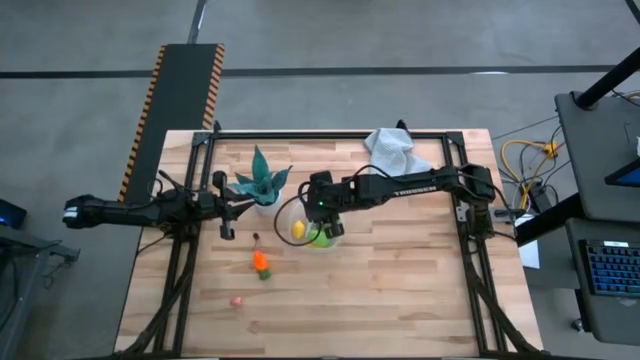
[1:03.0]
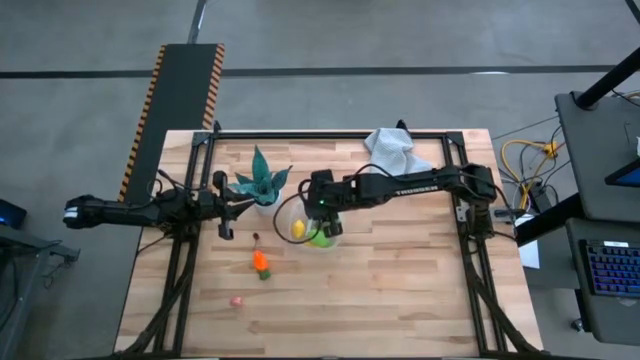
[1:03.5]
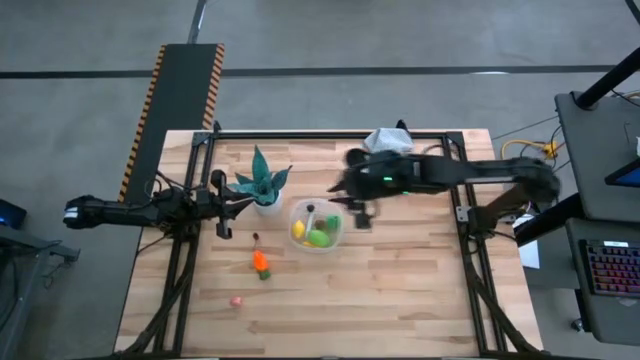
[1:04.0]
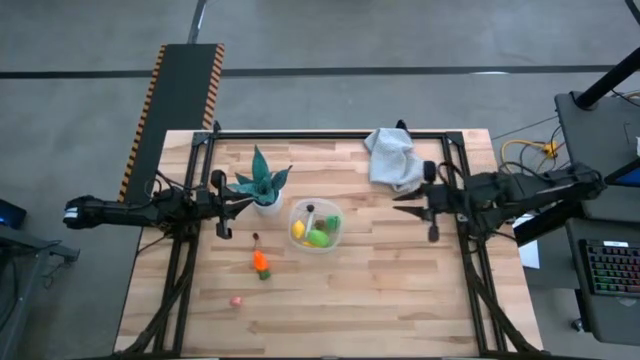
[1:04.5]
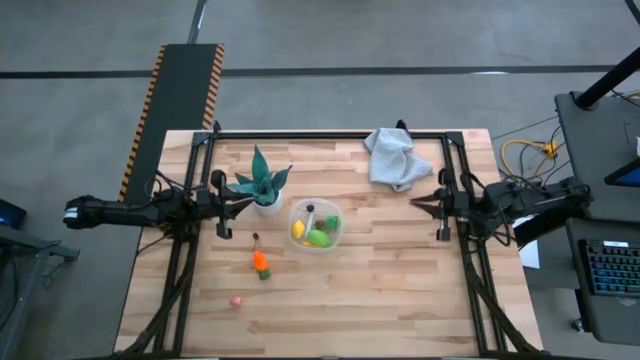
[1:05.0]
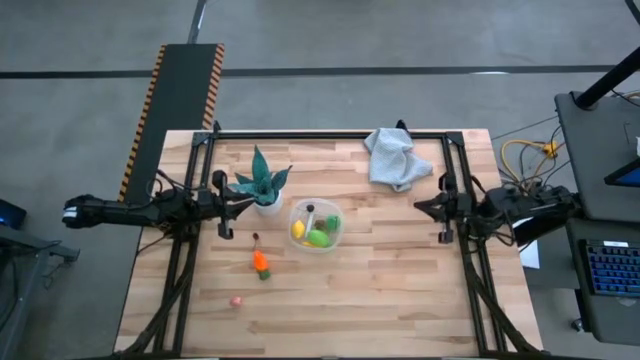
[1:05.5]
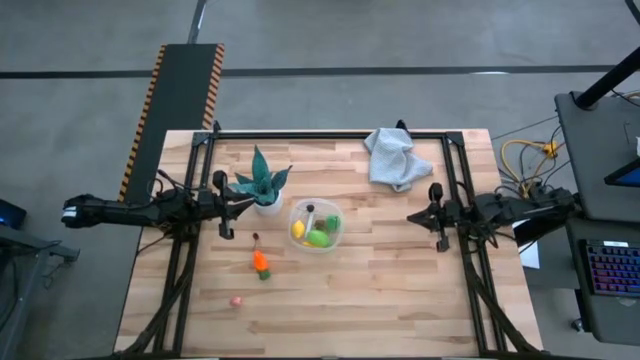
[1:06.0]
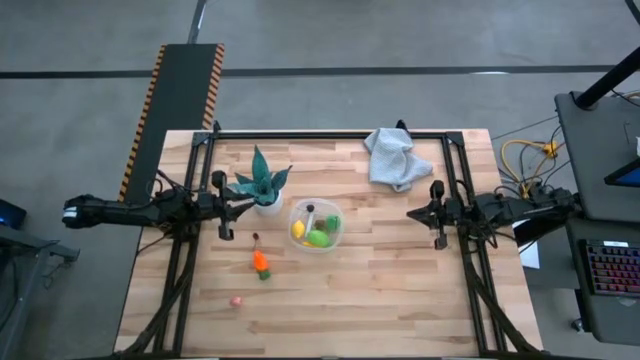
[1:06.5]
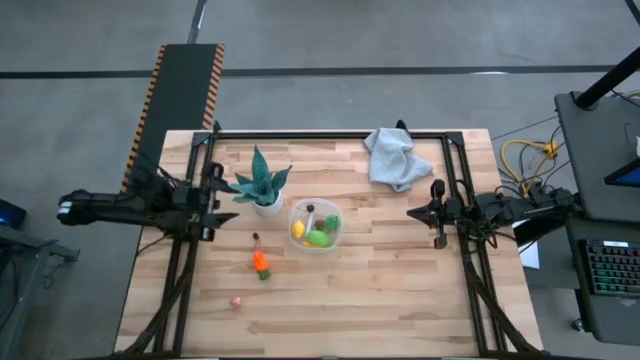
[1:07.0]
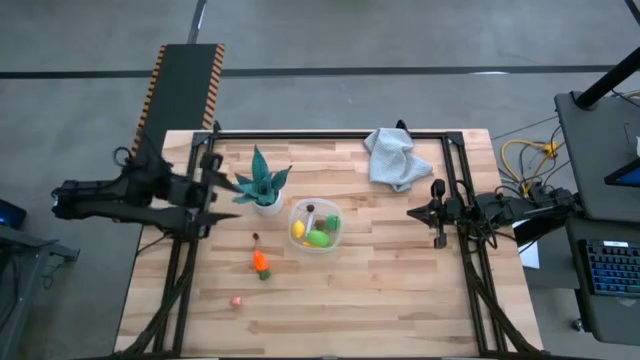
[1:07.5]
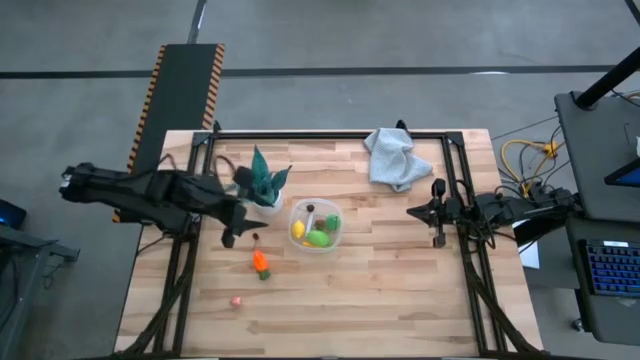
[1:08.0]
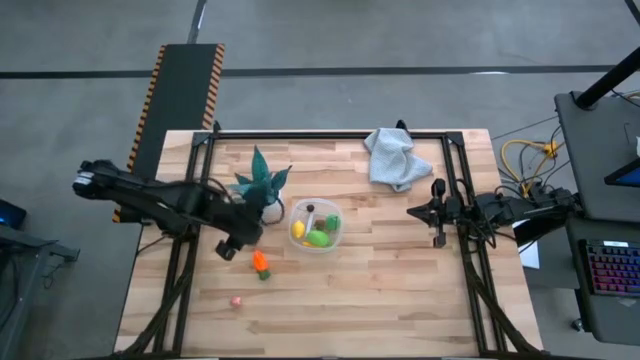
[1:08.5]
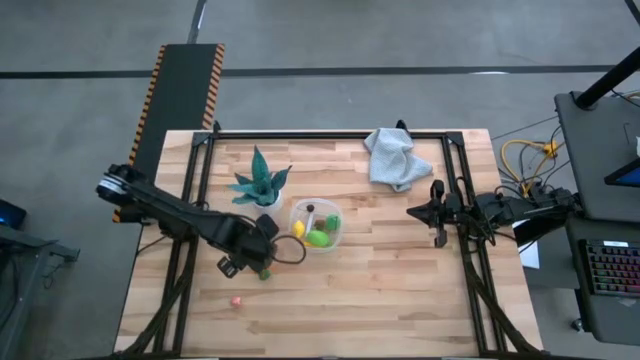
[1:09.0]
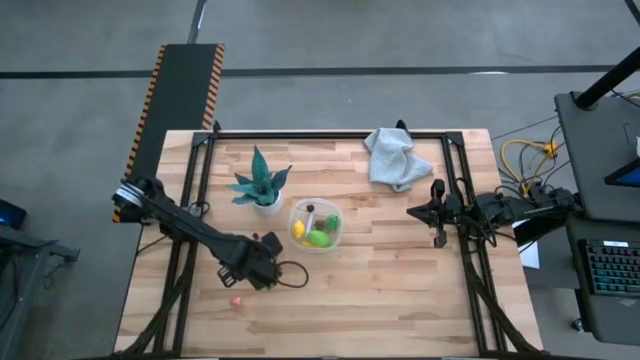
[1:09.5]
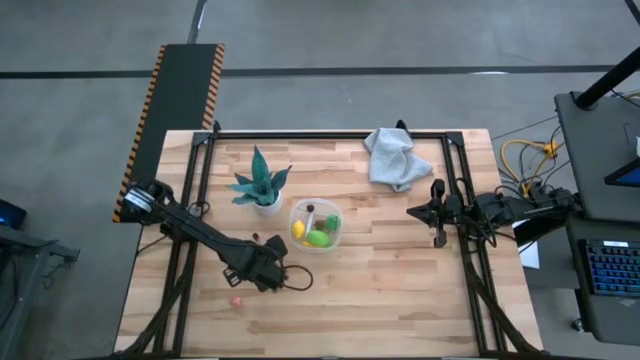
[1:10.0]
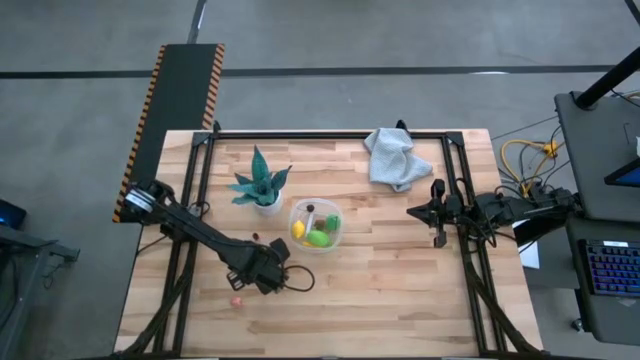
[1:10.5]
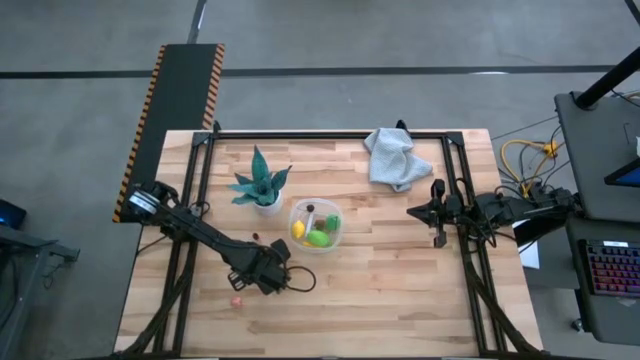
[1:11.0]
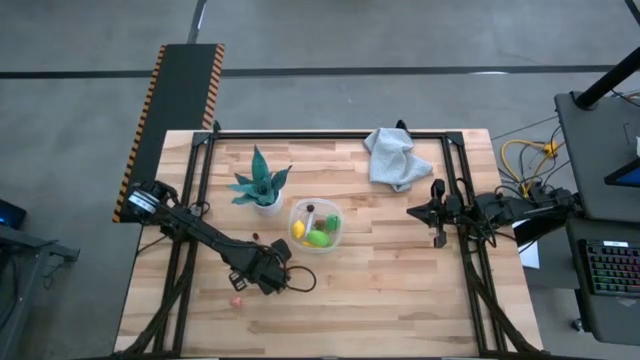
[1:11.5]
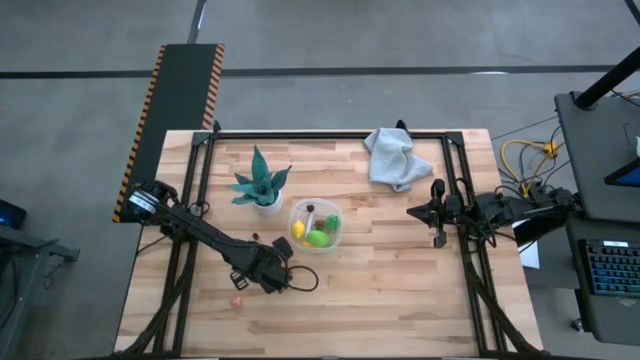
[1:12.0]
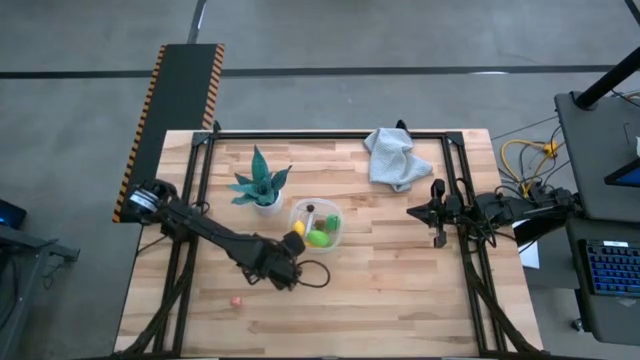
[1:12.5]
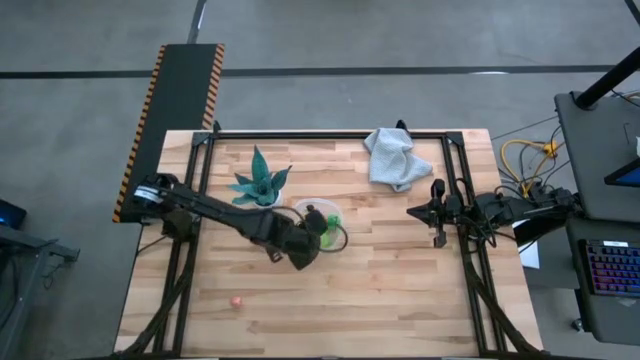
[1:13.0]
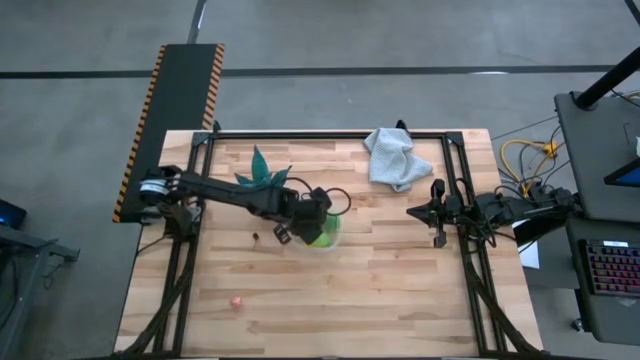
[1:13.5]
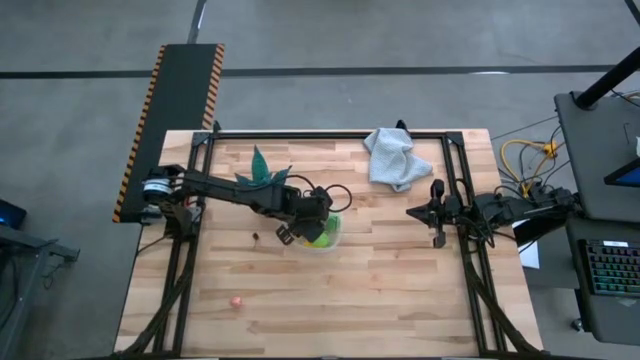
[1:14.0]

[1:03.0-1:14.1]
Task: Pick and placing Produce into tupperware
Put the orange carrot into the container

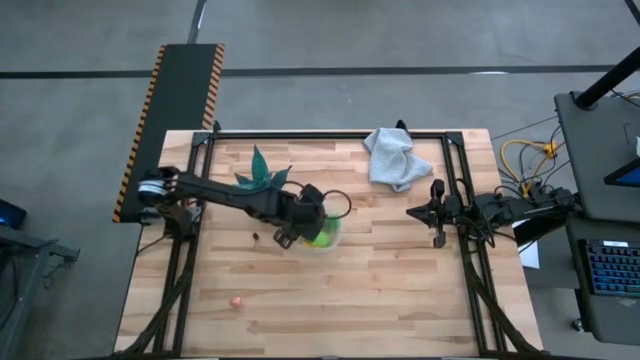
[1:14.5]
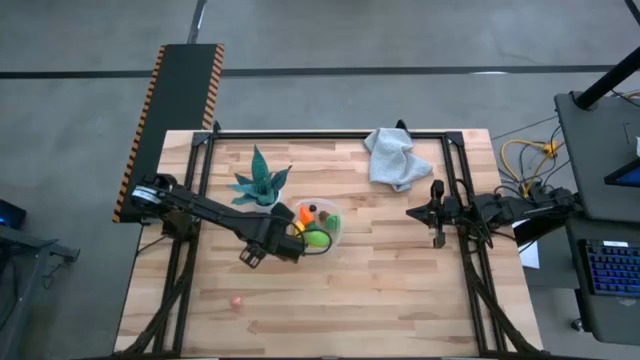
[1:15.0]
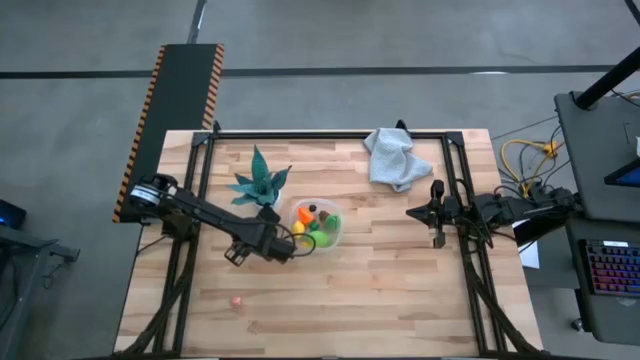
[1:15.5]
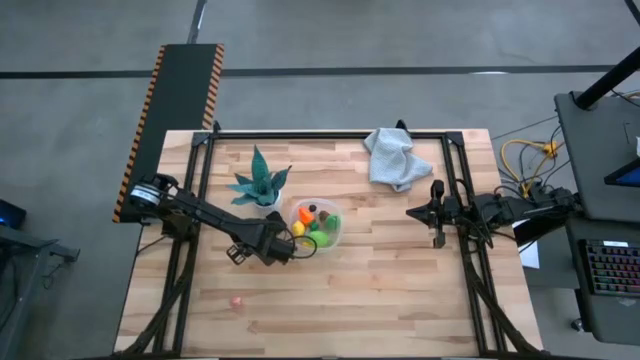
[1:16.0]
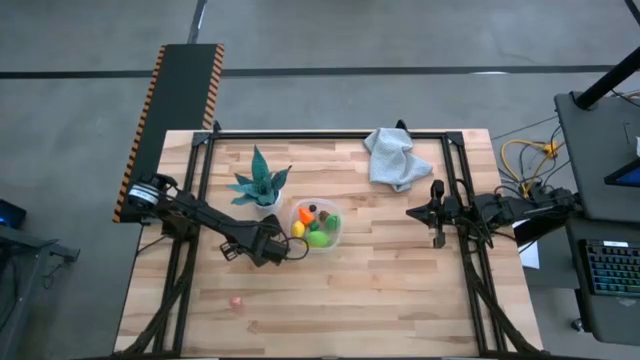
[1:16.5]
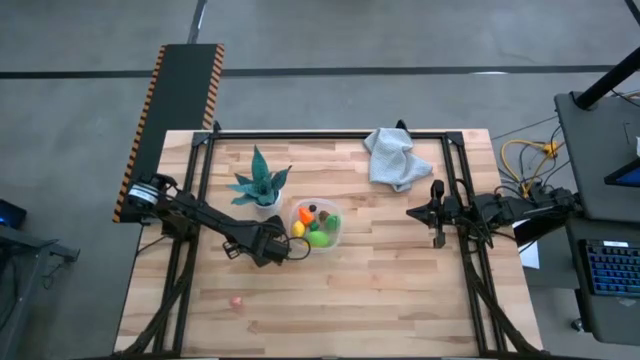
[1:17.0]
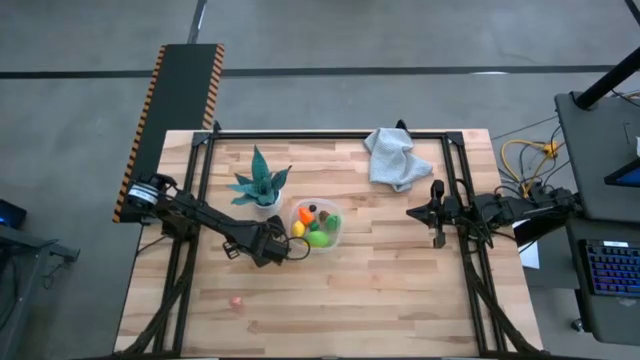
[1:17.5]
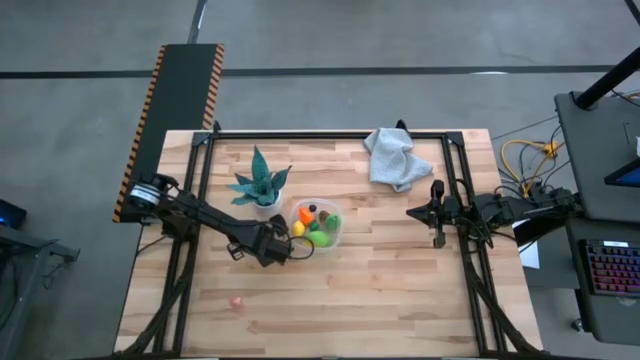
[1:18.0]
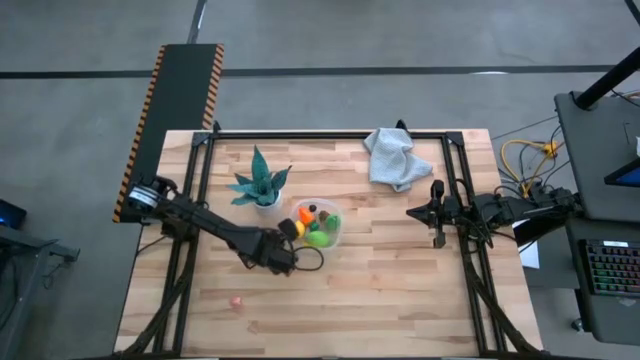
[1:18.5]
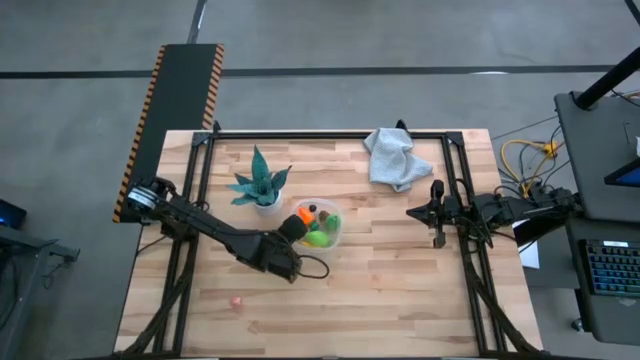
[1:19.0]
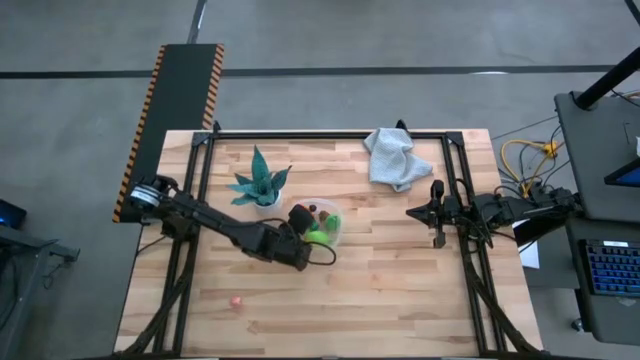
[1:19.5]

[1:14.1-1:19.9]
Put the red cherry into the container

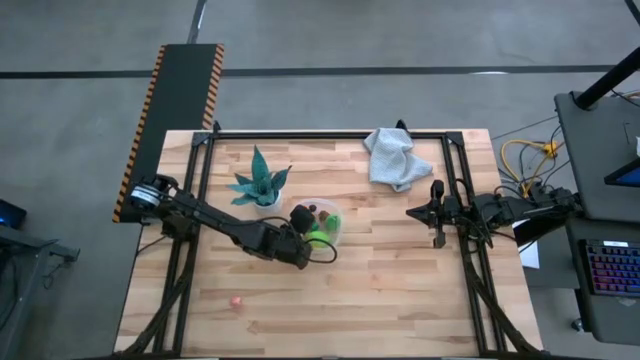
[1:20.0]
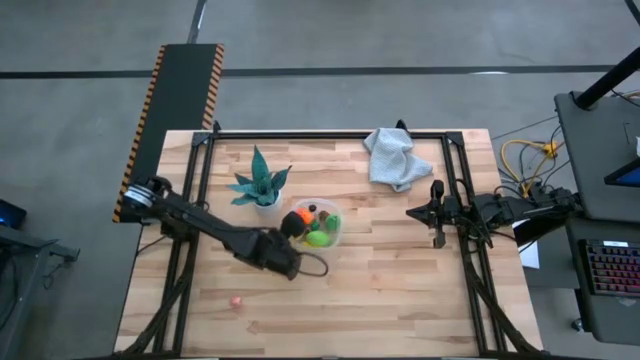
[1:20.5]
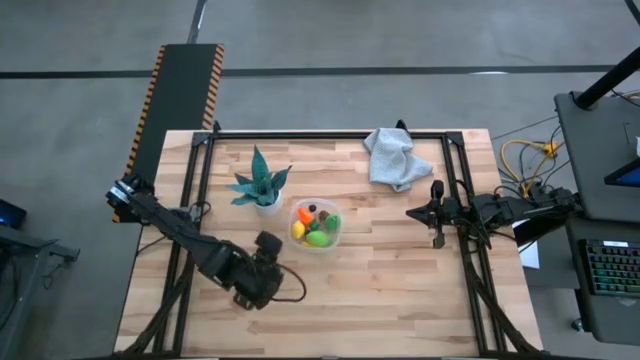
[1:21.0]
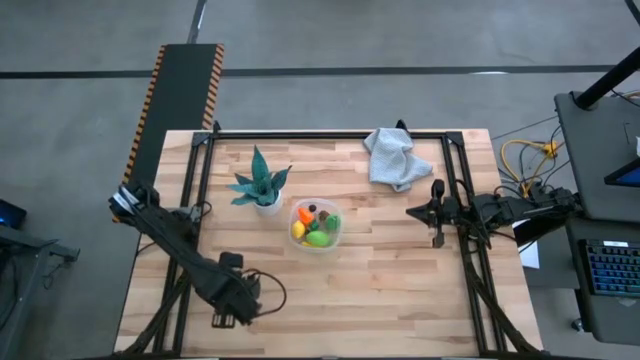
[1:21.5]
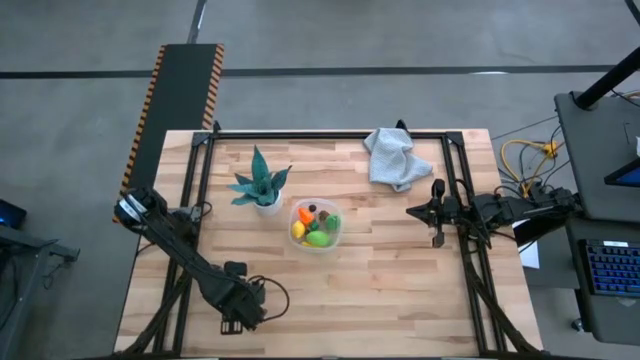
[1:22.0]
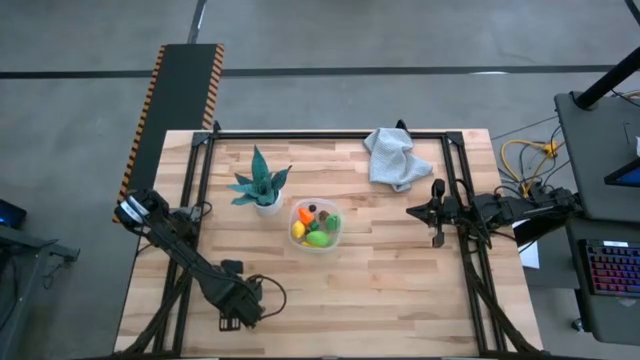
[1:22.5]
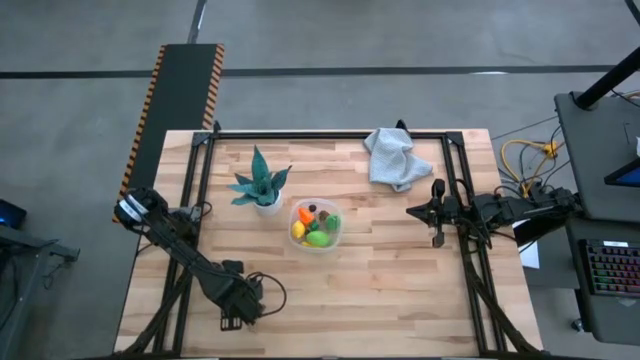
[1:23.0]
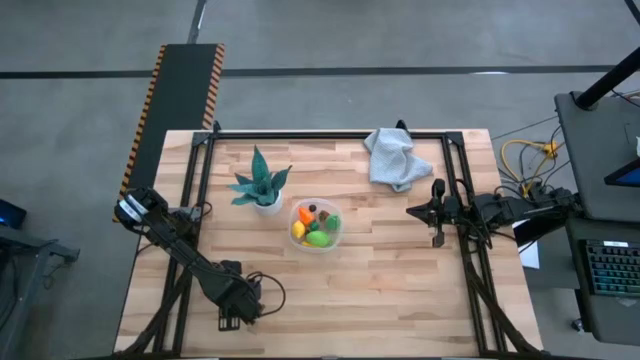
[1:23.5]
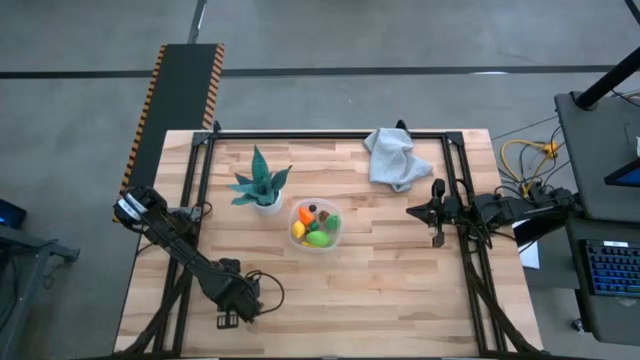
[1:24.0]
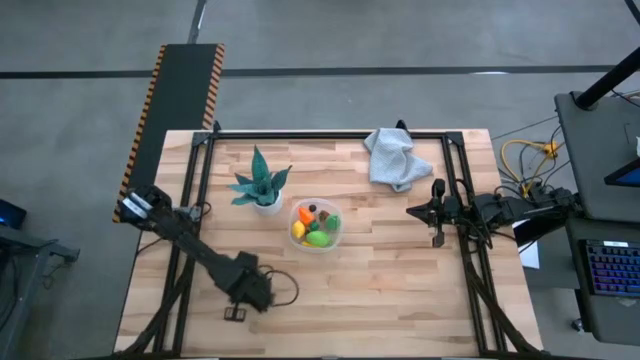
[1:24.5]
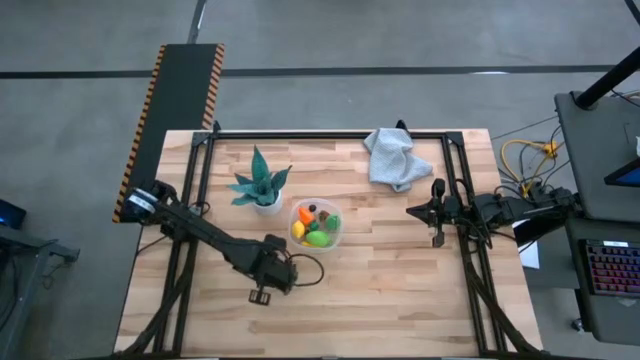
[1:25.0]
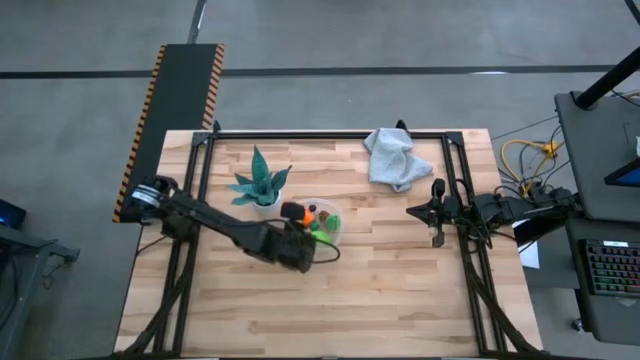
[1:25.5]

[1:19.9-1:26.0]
Put the pink peach into the container
